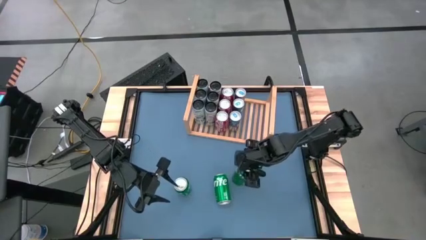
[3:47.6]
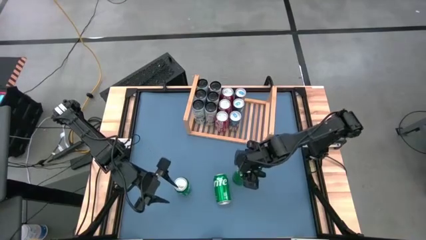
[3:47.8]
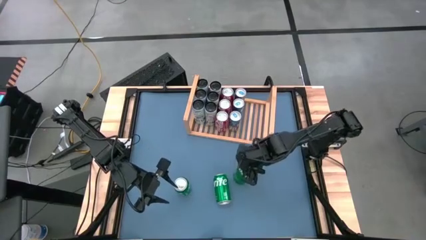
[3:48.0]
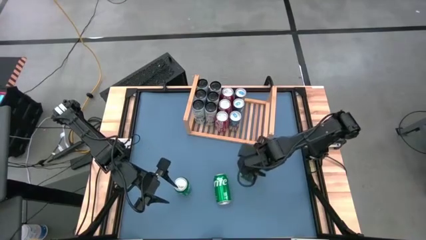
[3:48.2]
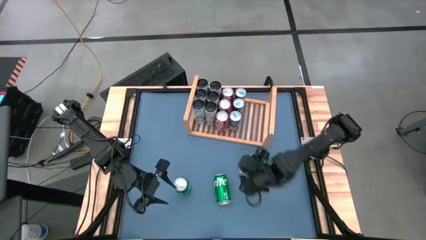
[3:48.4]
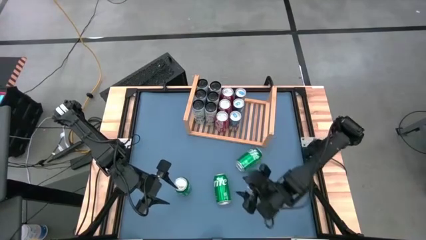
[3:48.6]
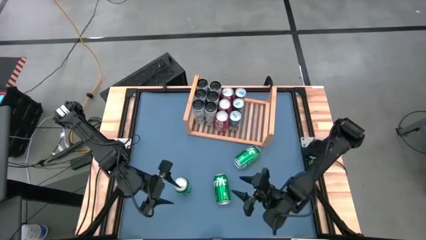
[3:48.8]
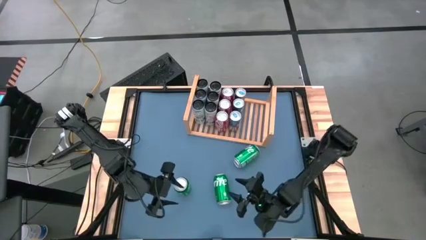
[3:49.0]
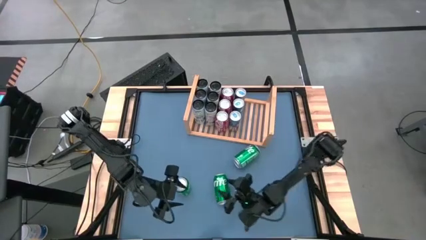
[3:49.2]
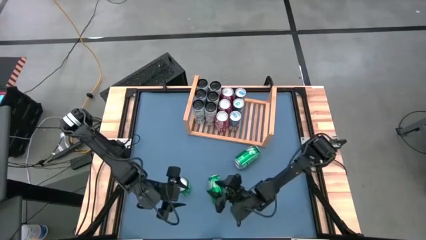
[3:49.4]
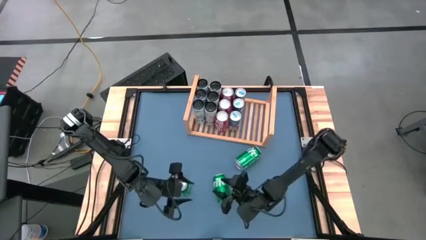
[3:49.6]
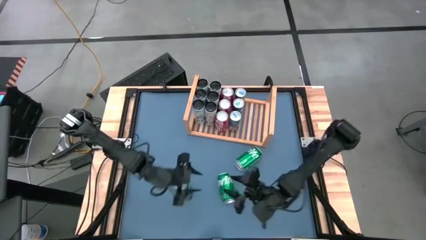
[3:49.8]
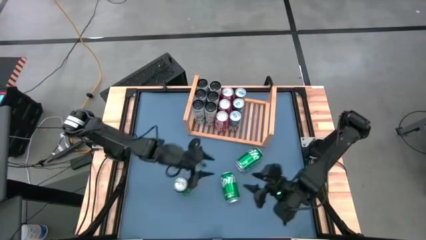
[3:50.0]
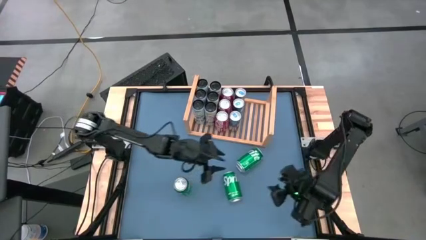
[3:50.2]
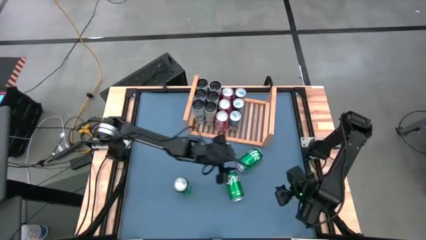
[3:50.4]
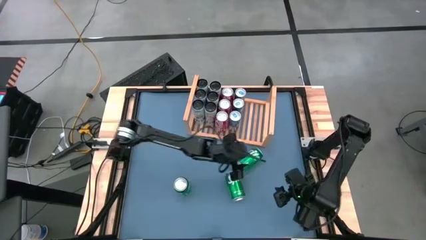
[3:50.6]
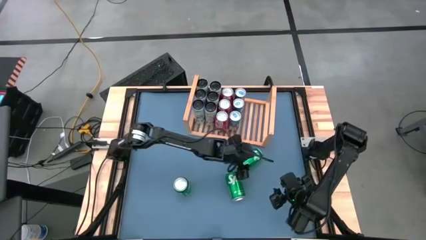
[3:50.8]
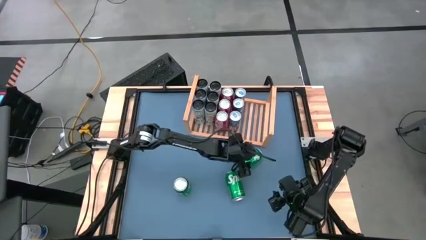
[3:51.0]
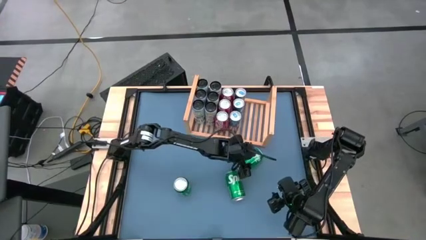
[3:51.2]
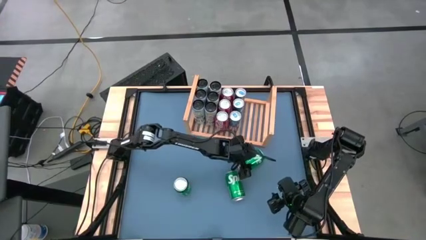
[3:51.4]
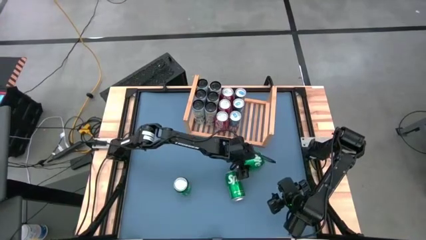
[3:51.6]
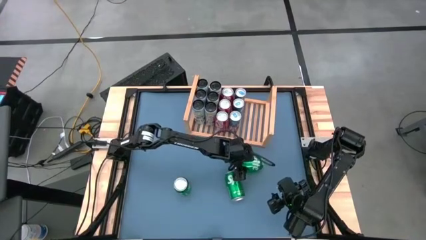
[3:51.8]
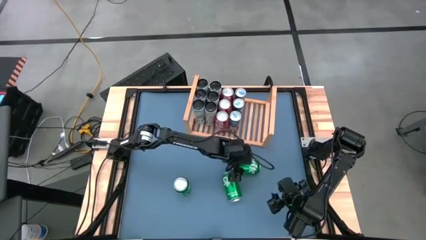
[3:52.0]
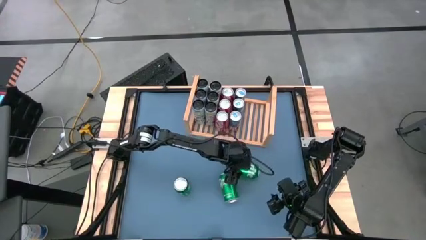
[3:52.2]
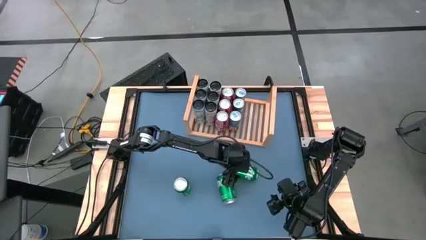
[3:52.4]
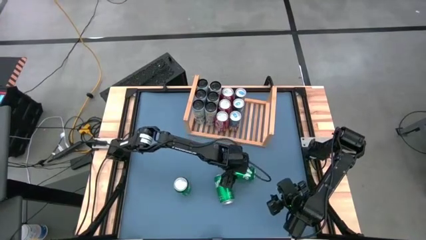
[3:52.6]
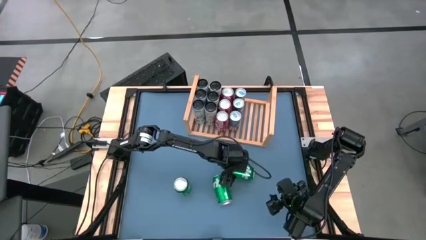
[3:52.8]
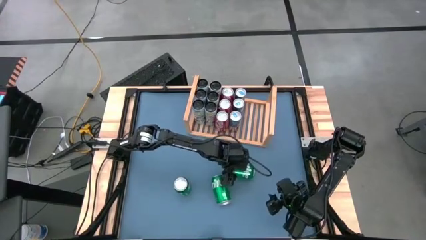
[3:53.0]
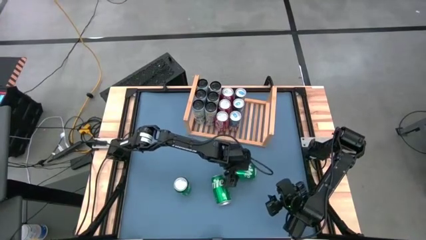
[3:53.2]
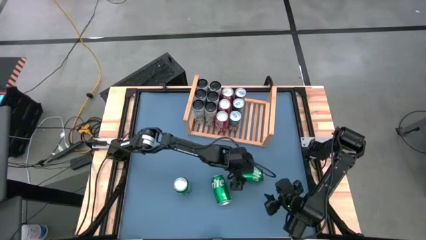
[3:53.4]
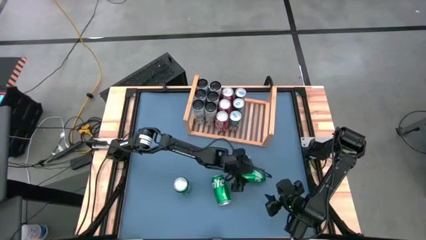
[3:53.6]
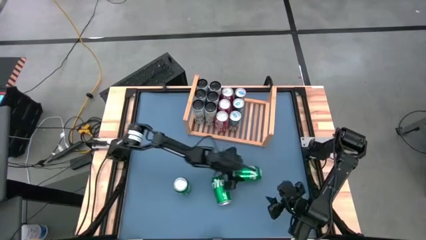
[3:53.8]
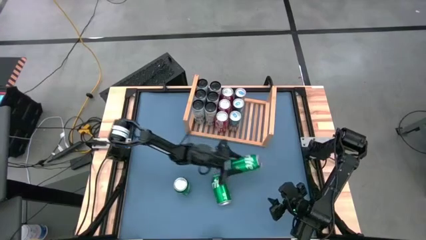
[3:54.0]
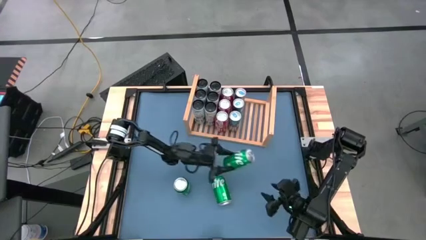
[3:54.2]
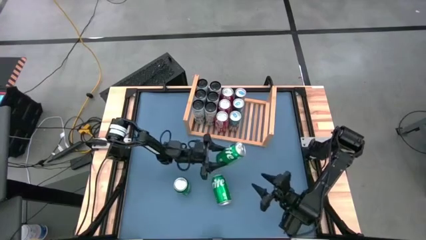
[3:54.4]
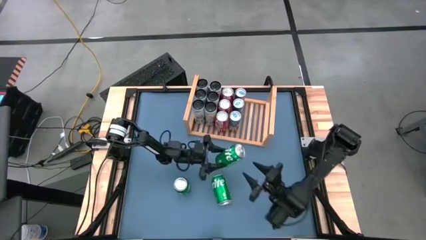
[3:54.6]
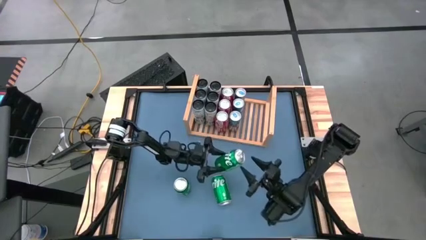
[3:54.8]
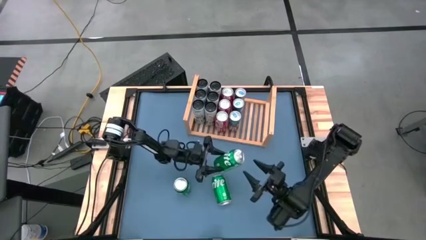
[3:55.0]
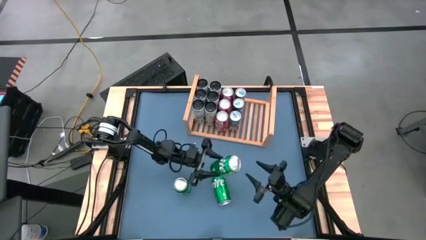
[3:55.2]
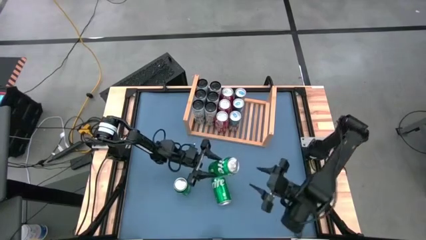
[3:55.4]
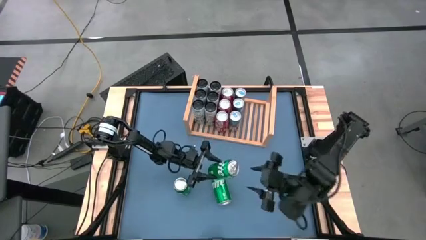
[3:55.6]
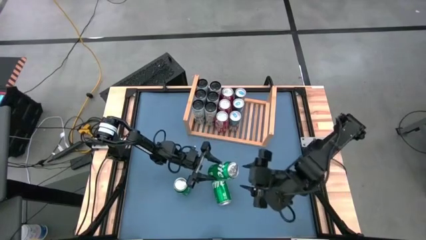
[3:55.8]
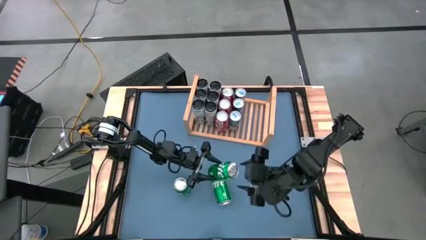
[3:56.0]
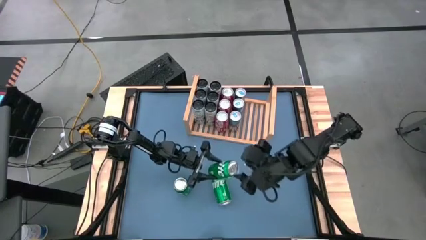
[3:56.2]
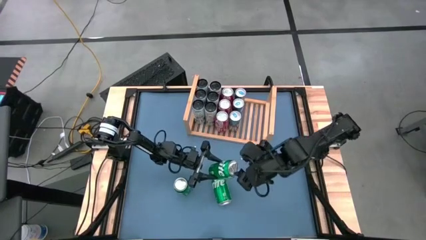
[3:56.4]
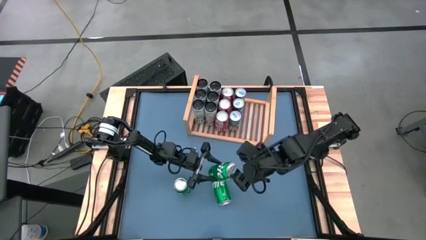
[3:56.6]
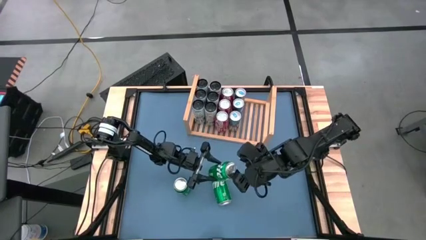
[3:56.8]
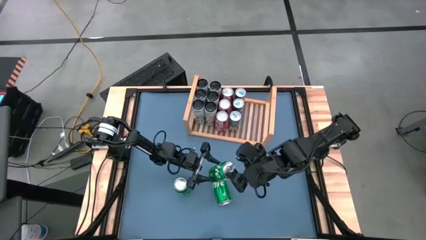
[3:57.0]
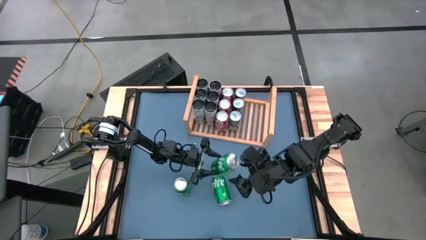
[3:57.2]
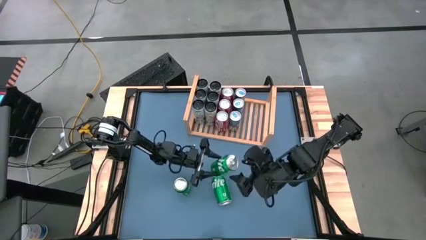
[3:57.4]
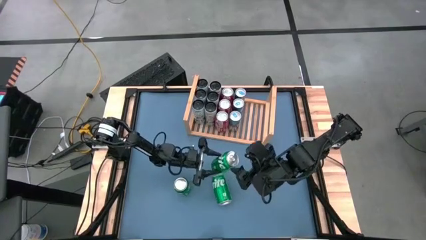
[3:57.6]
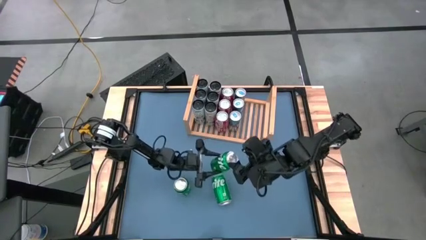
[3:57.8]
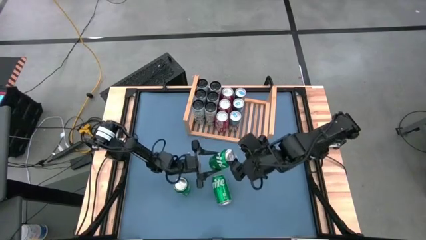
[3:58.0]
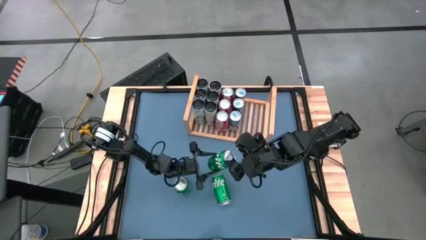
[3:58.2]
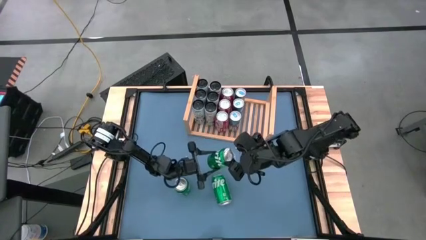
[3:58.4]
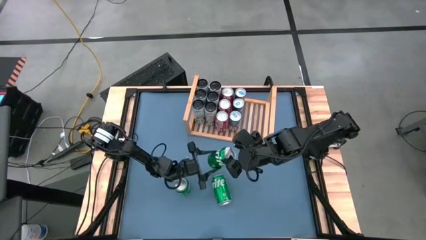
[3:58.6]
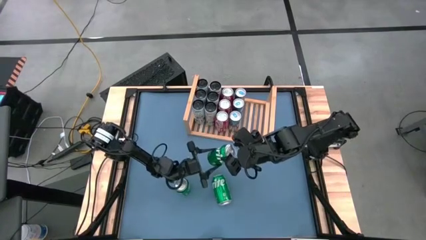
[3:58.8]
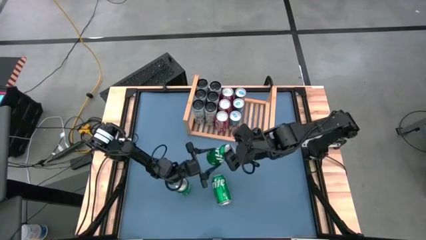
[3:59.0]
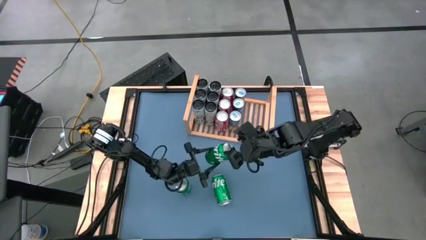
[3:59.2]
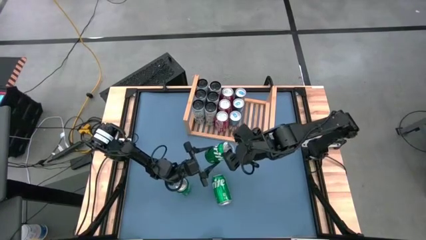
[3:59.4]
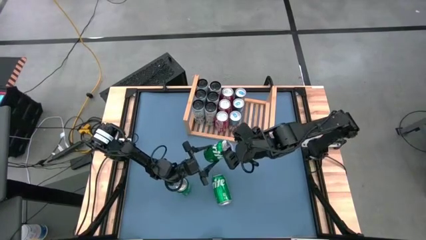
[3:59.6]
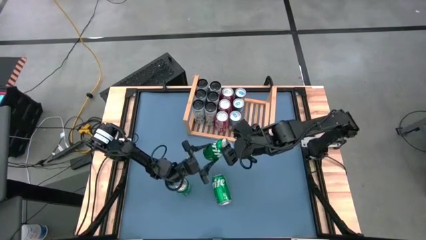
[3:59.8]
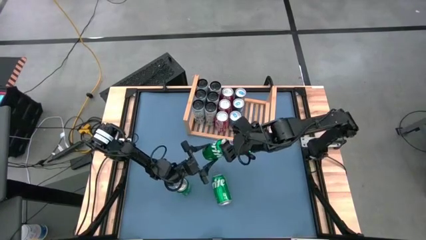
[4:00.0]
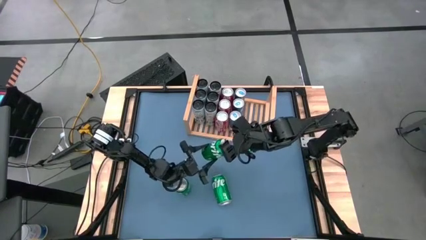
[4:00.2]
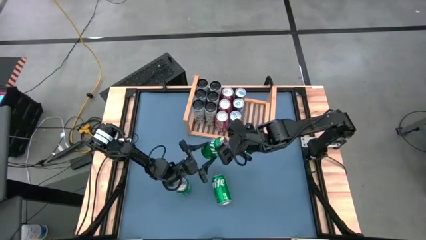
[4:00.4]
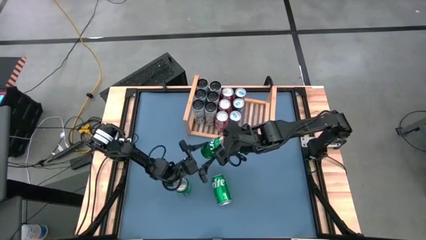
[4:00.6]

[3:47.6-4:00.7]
Task: Place canned beverage on shelf
Put the green soda can on the shelf

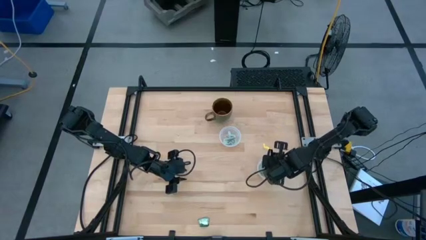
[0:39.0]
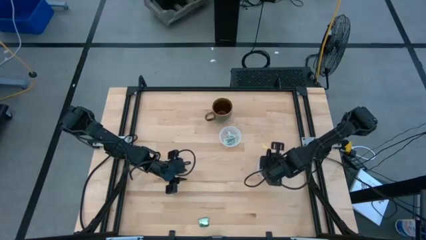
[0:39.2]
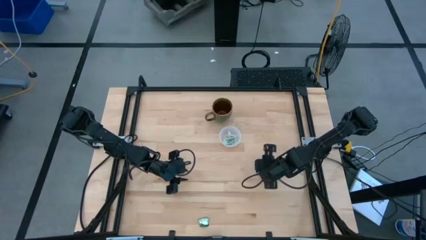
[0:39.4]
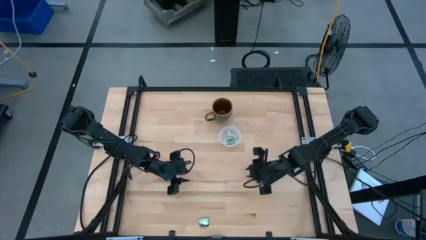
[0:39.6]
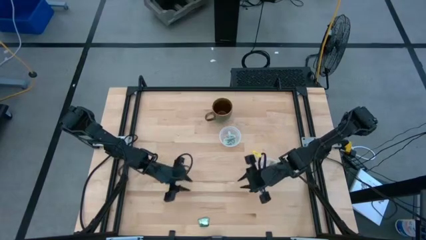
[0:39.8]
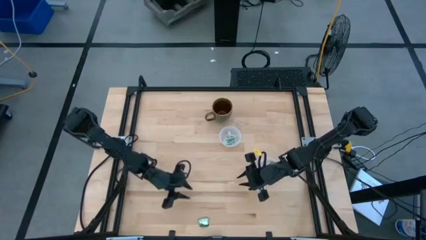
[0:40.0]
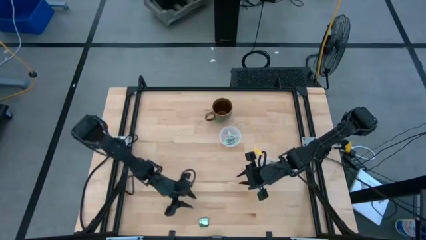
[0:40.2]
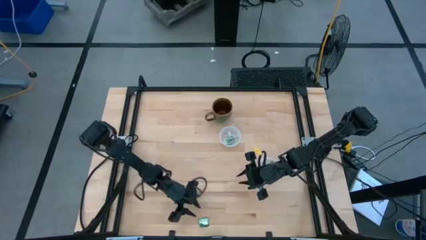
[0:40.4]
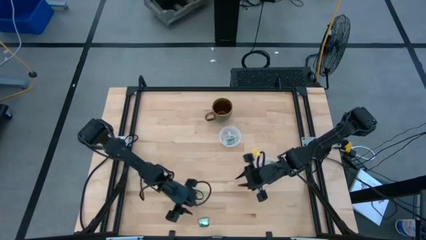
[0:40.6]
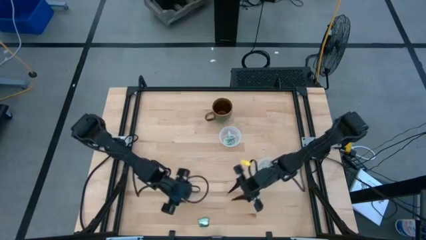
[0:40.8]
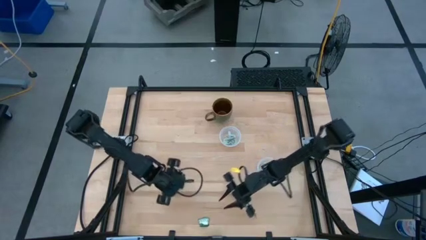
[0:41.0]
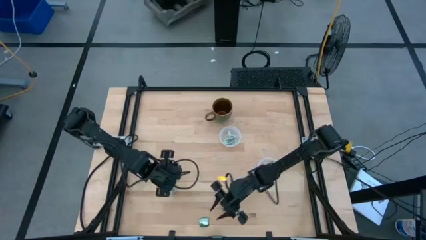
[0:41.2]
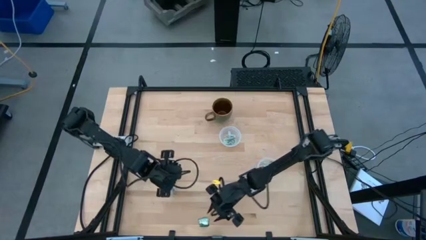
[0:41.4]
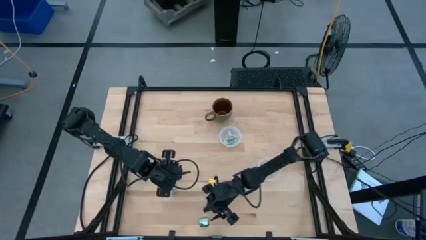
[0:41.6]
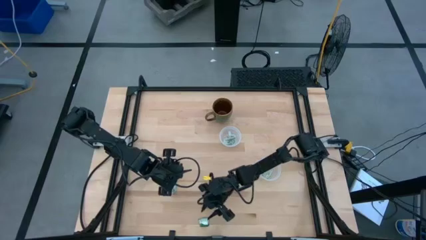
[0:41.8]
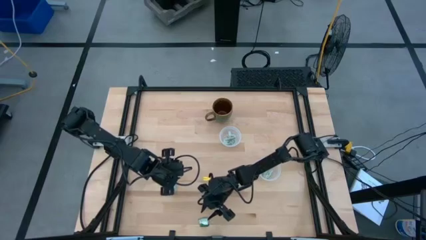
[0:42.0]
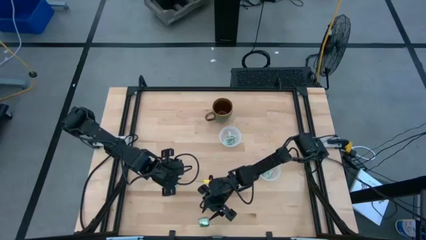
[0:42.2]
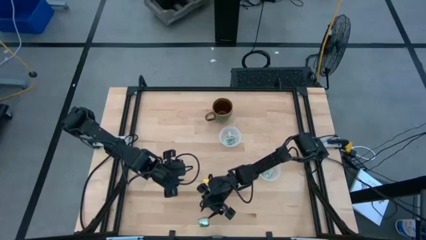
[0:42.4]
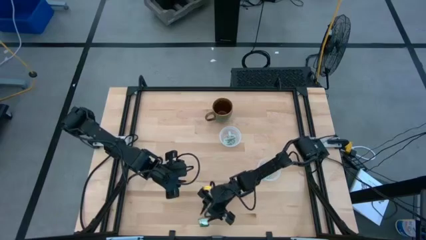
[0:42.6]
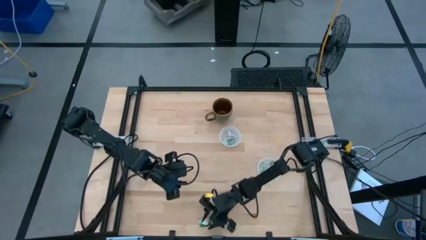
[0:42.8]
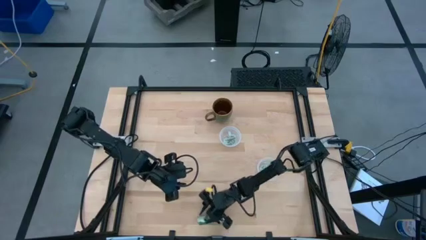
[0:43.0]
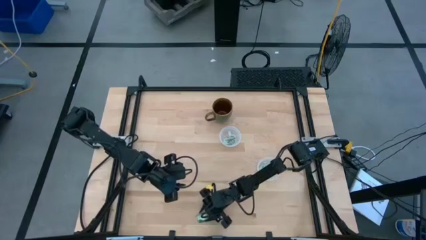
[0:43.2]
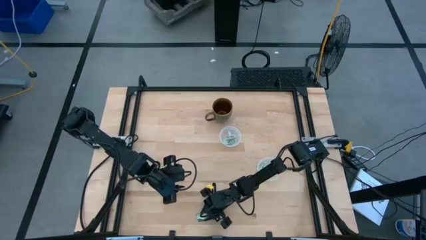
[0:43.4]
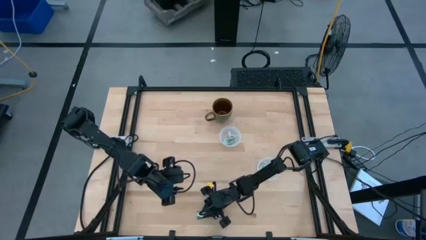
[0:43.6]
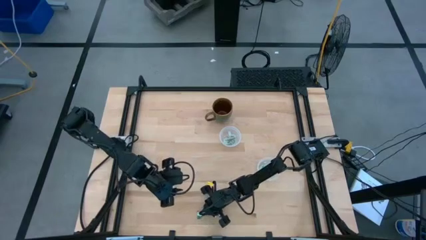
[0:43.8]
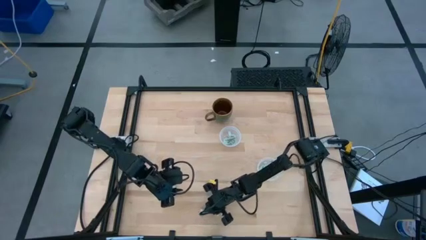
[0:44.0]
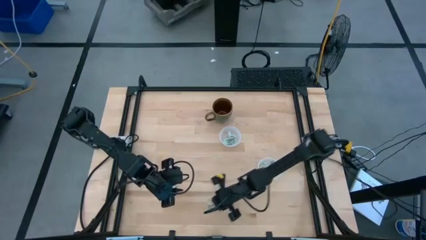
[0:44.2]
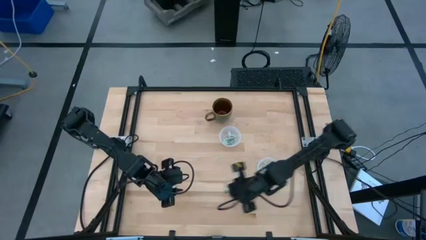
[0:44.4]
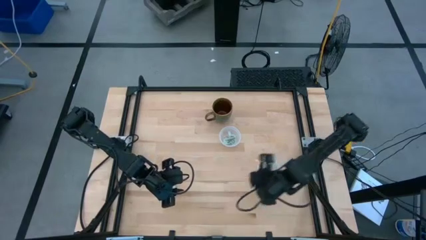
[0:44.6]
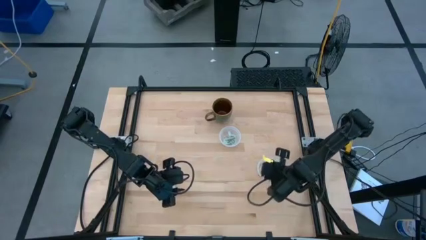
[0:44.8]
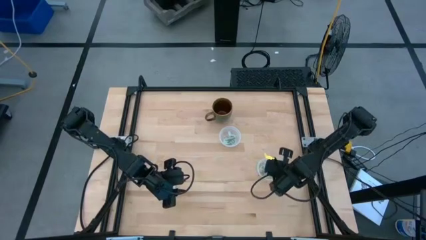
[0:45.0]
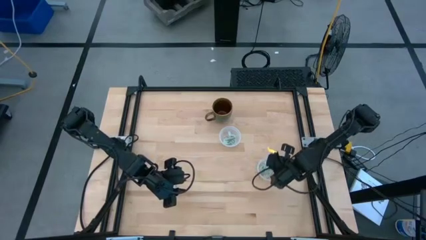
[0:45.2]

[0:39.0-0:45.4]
Task: Pick and place items into bin
Put the stevia packet into the bottom transparent bin
